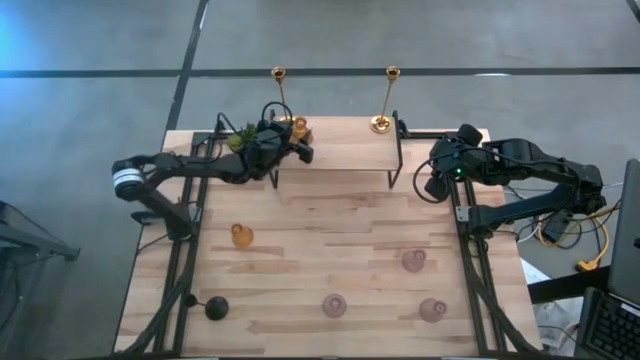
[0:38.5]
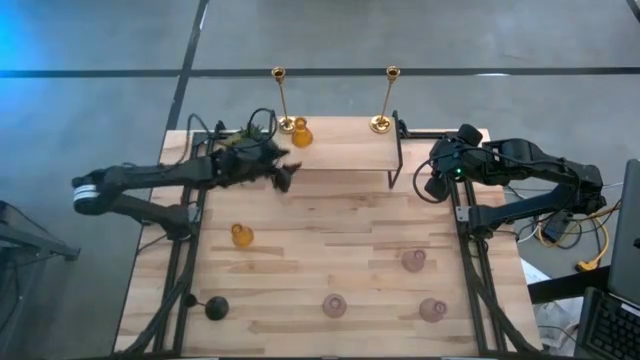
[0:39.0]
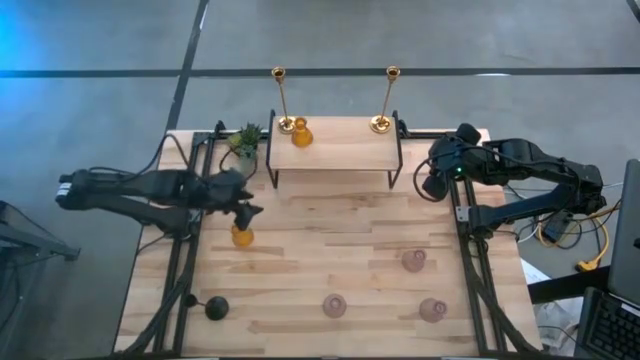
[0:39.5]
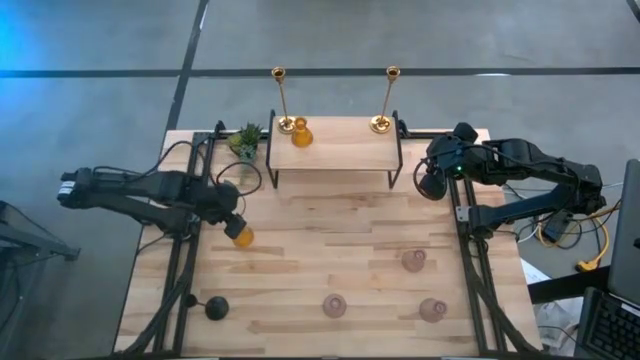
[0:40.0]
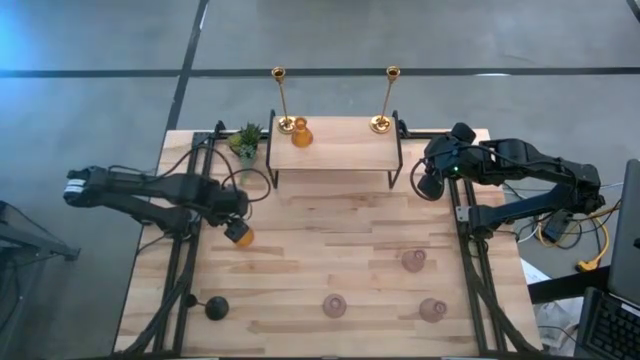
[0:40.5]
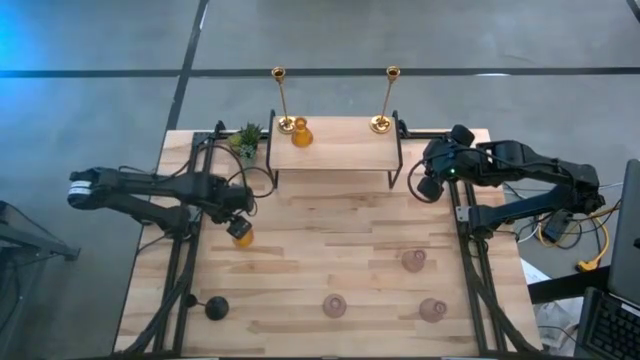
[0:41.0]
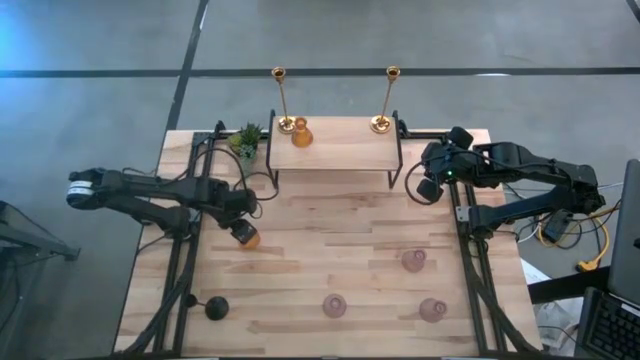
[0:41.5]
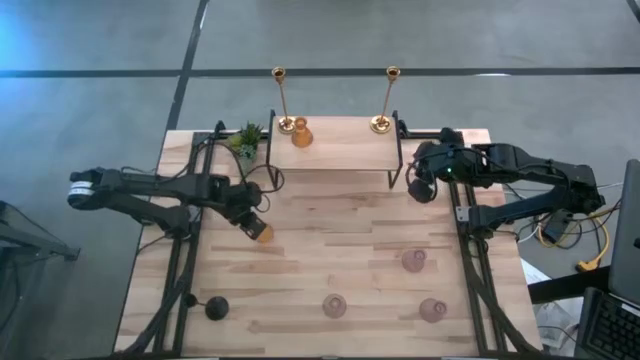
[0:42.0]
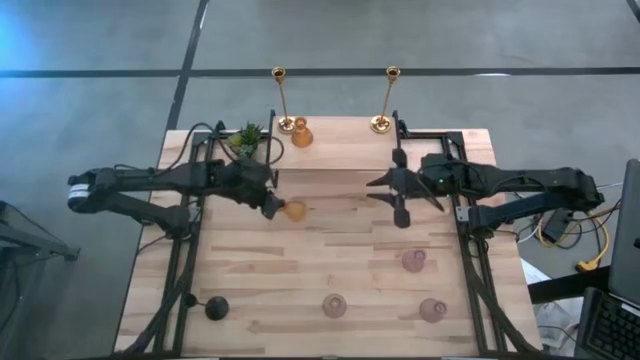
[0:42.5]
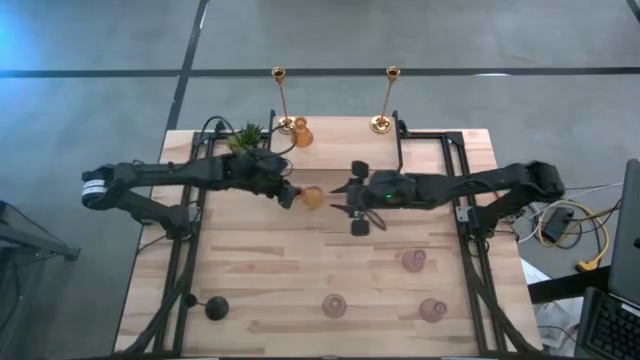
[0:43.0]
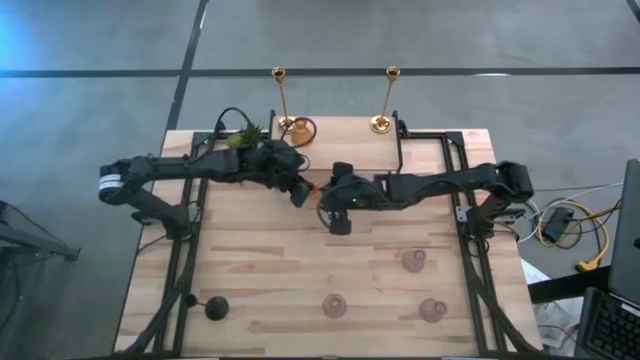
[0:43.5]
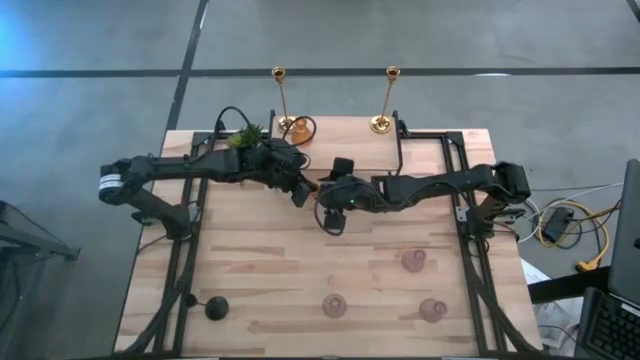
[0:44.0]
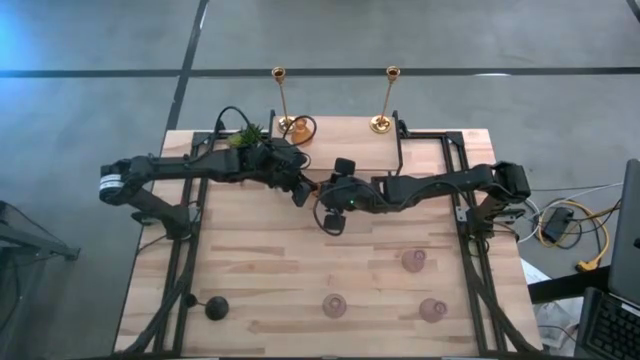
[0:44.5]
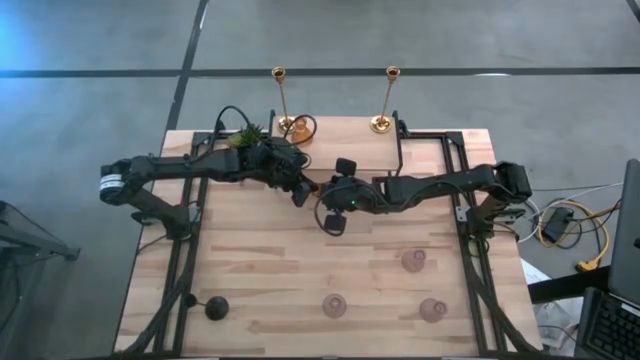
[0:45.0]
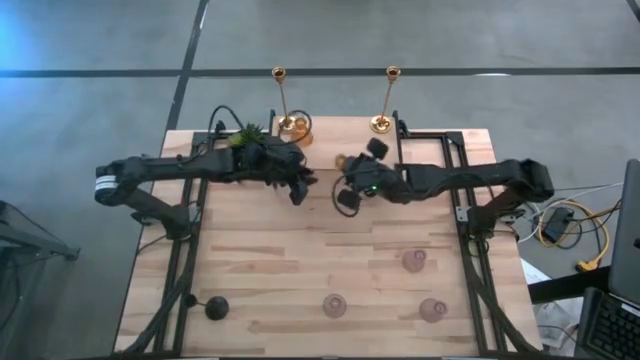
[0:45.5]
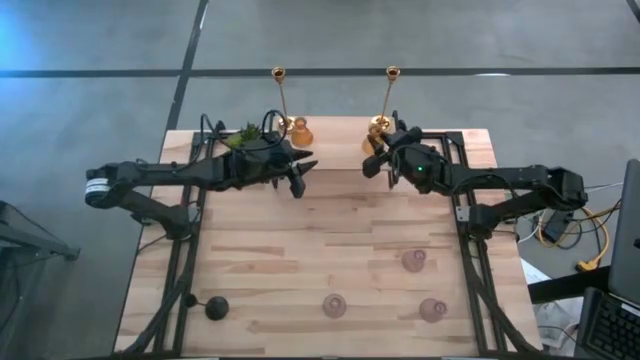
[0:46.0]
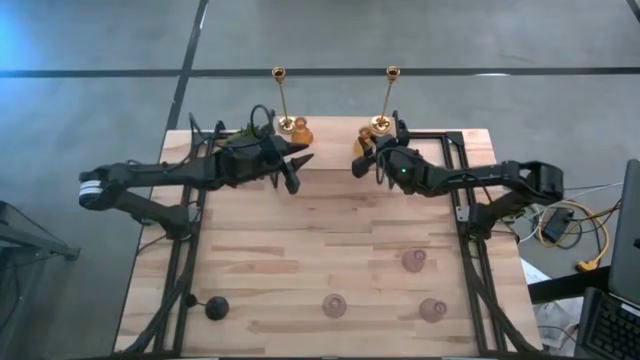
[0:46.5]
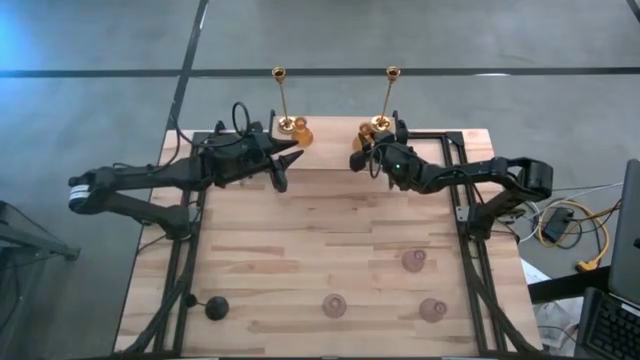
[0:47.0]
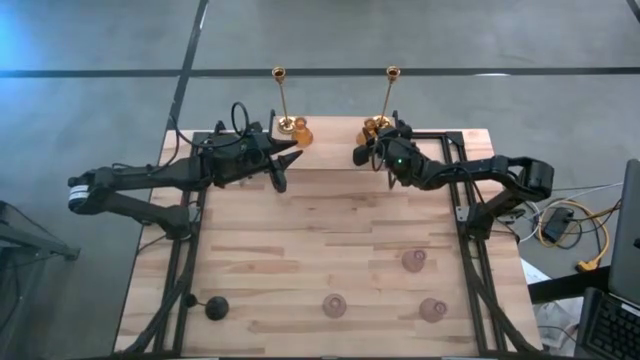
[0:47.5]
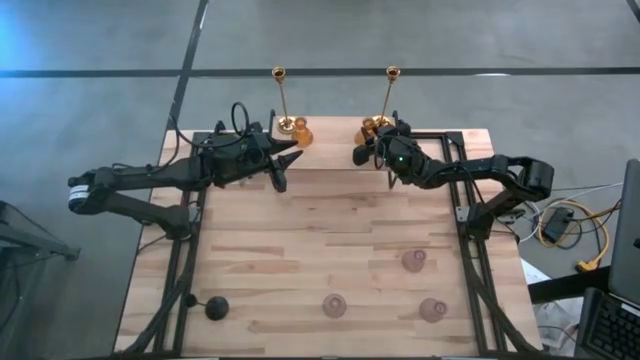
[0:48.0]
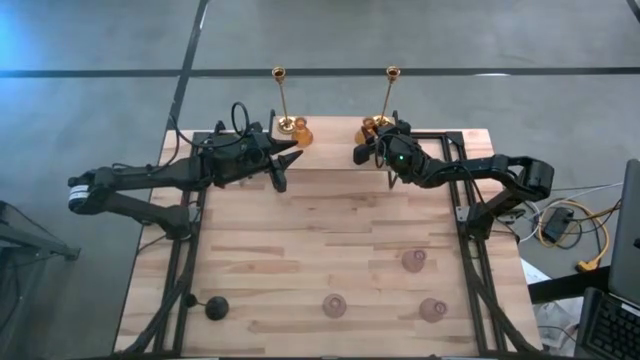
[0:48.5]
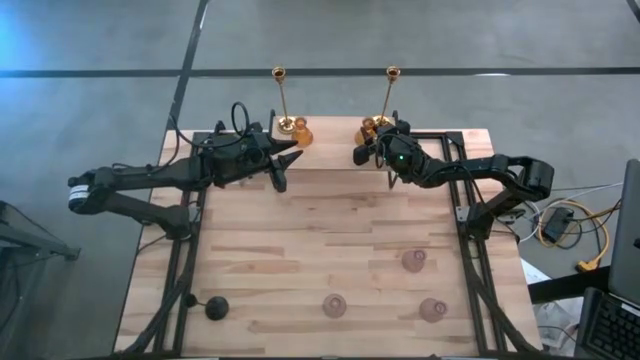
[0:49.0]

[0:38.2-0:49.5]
Task: Pick & Place candle stick holders
Put the orange glass candle holder on the shelf

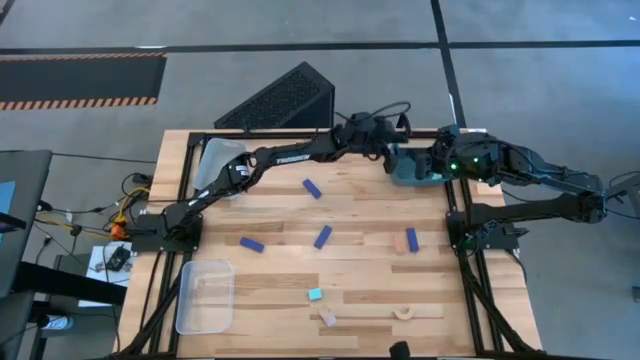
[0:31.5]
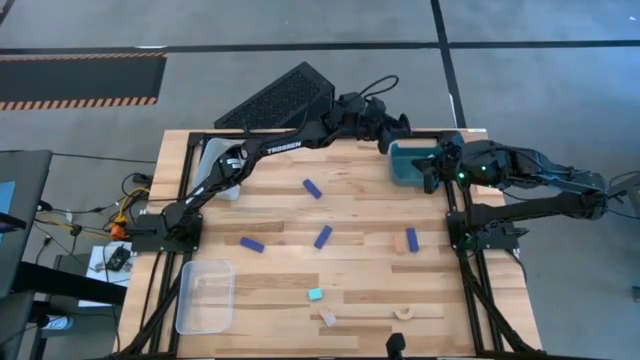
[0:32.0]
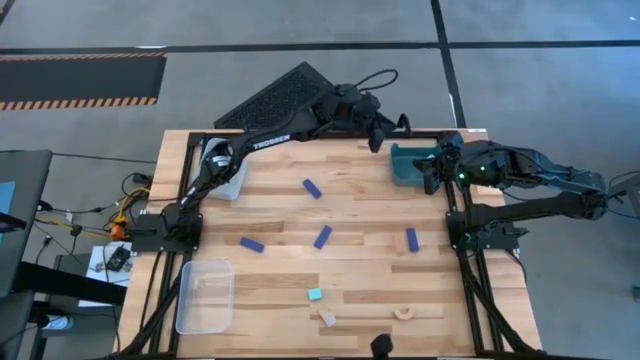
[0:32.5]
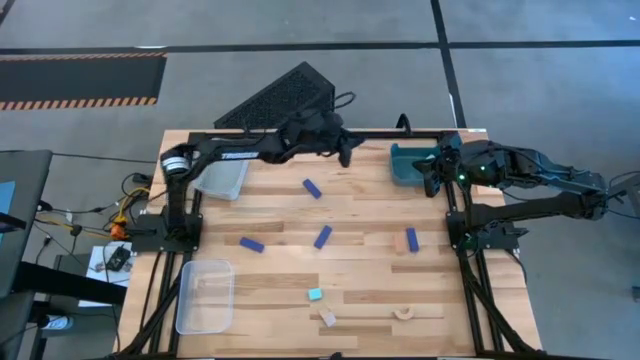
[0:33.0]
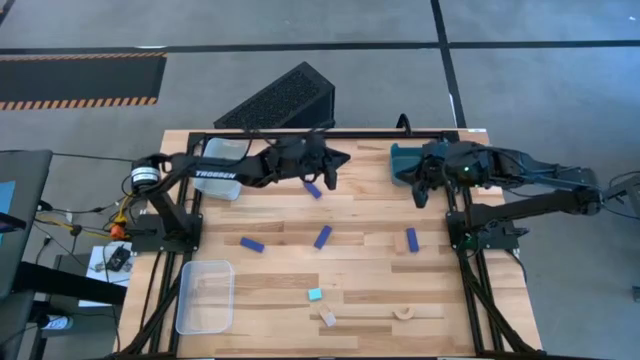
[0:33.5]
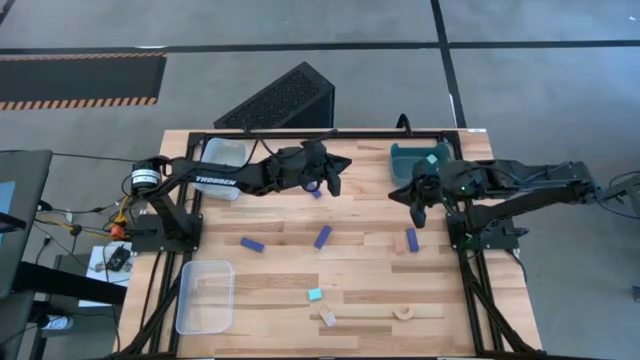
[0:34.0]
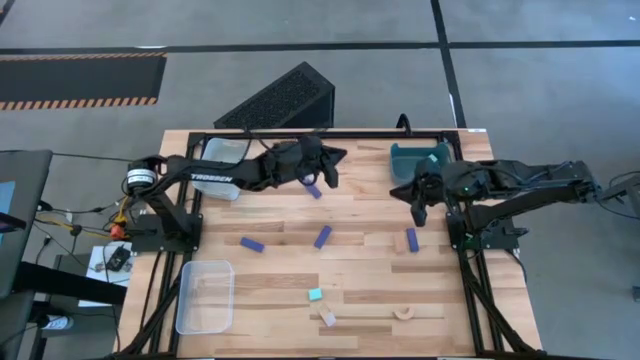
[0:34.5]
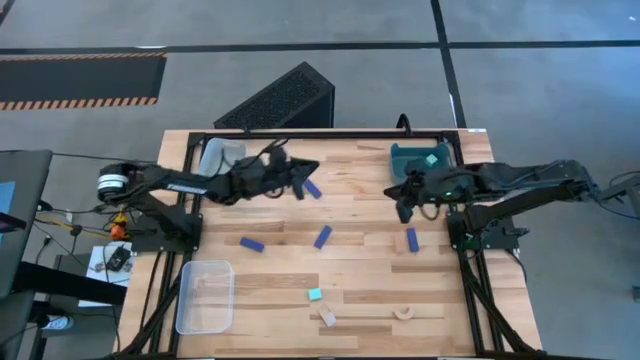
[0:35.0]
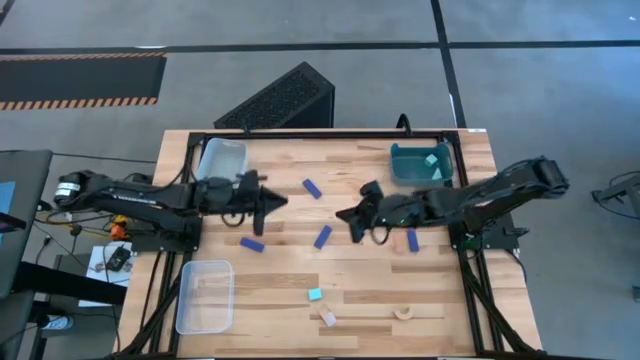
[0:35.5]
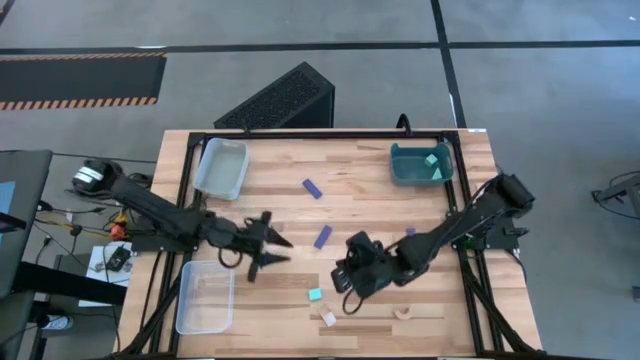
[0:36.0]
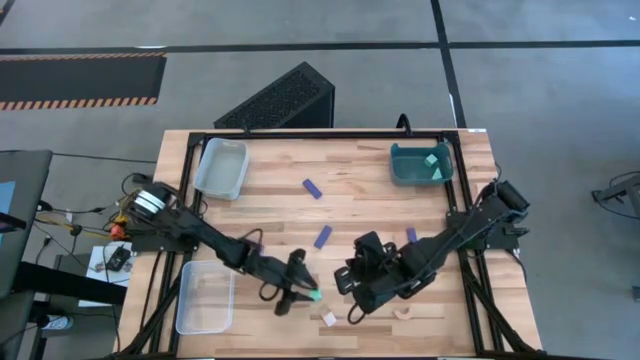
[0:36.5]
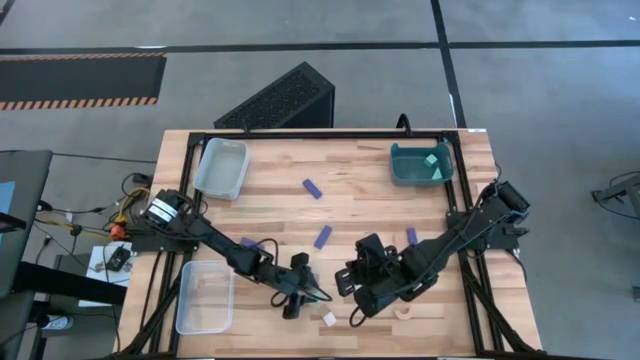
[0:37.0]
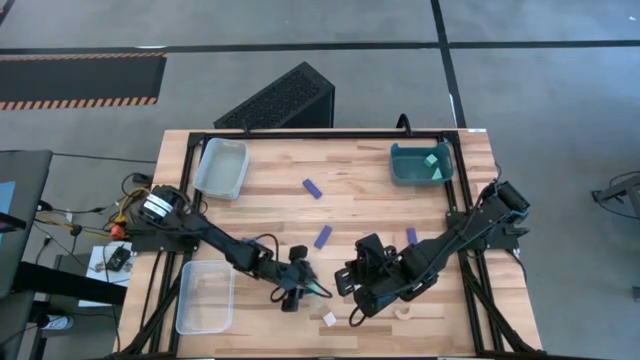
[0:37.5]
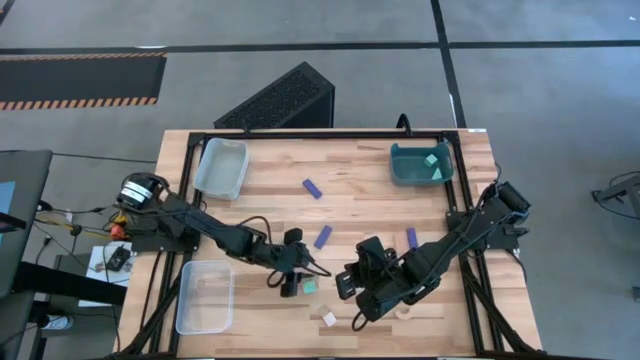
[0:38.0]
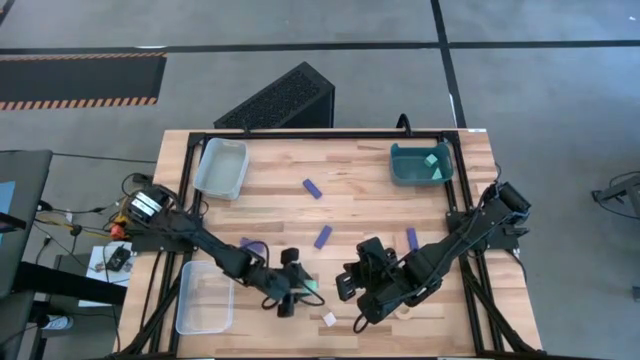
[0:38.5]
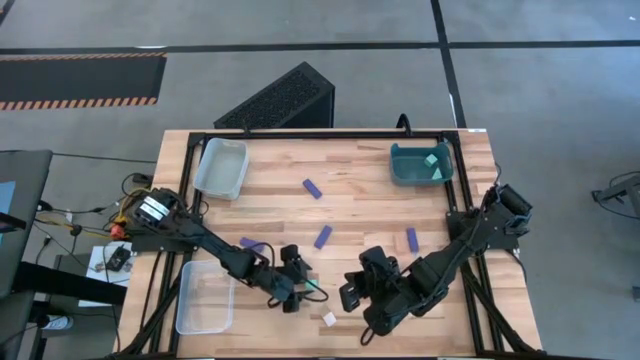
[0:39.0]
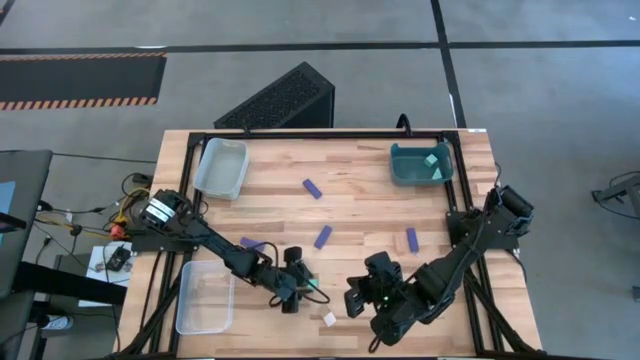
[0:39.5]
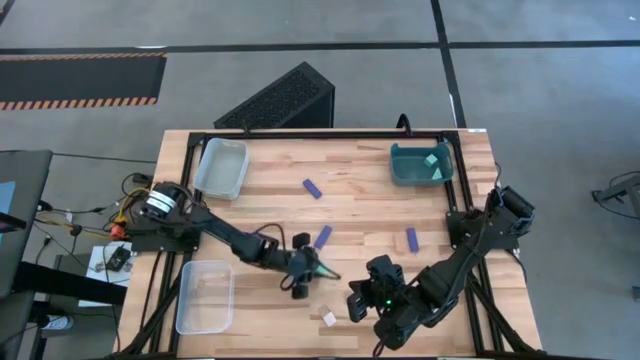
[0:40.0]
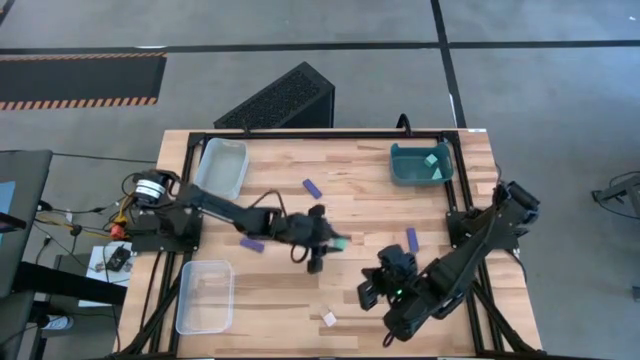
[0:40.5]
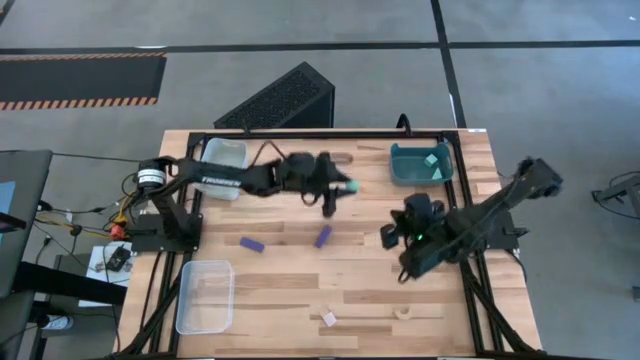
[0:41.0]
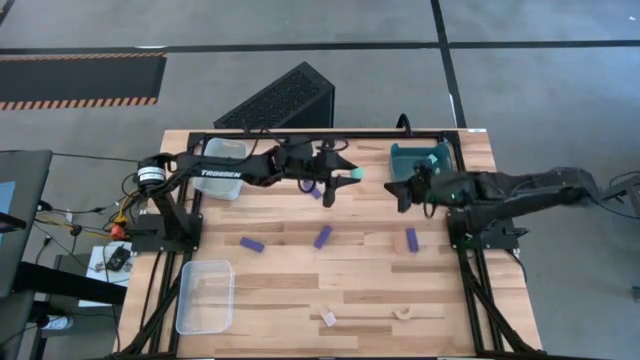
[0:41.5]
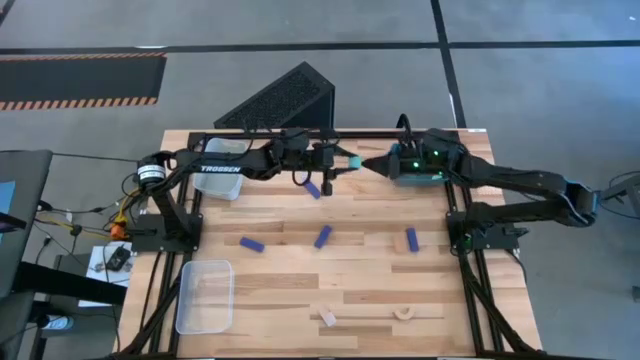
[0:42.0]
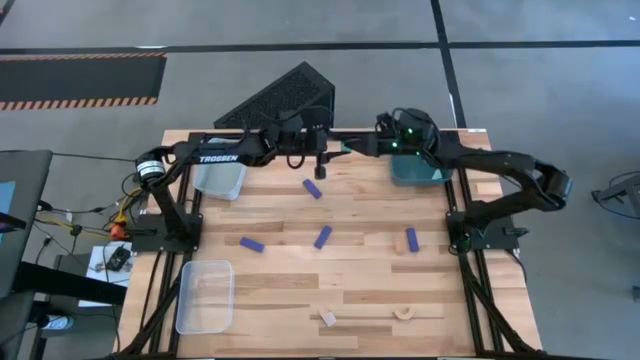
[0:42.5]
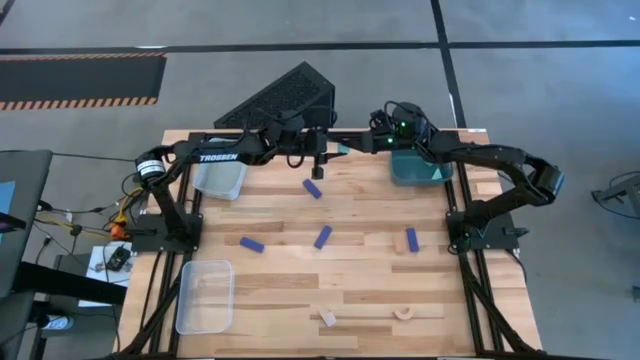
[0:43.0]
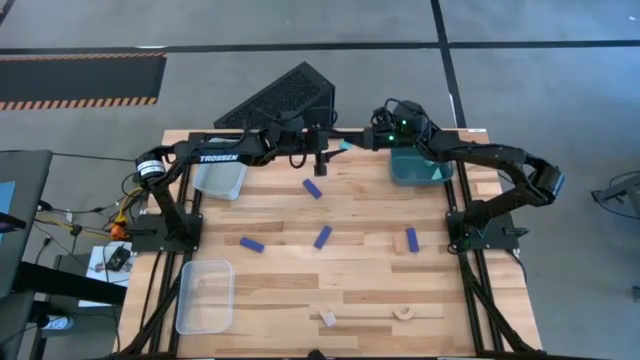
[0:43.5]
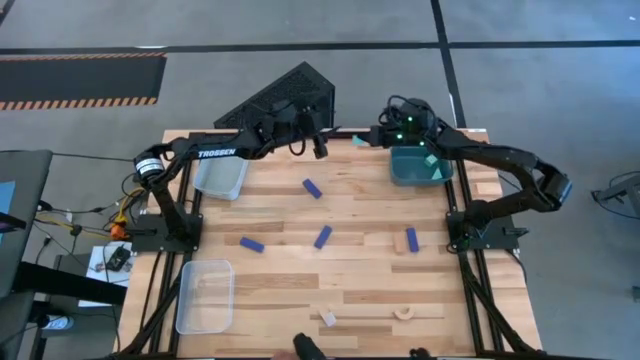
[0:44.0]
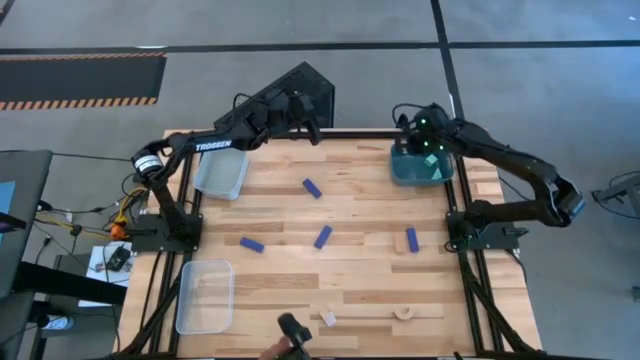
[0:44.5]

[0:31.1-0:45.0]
Task: Sort & place blocks by color
Put the light blue block into the dark green bin
